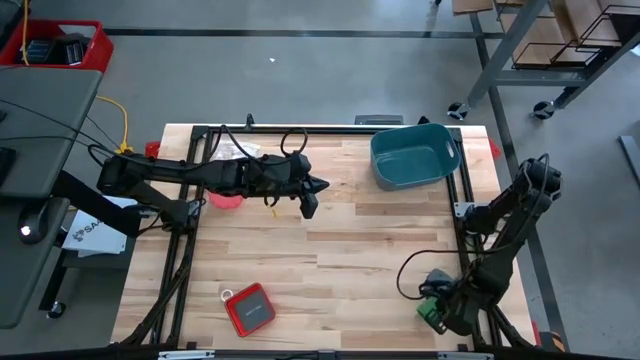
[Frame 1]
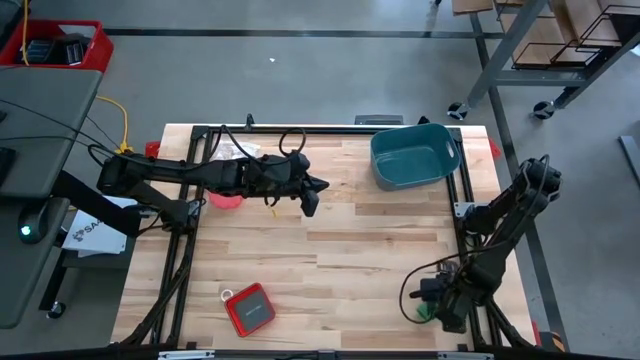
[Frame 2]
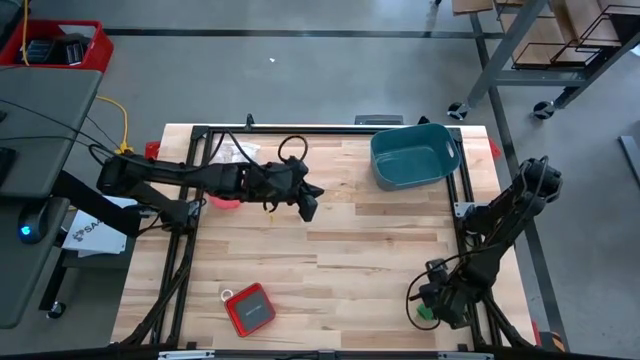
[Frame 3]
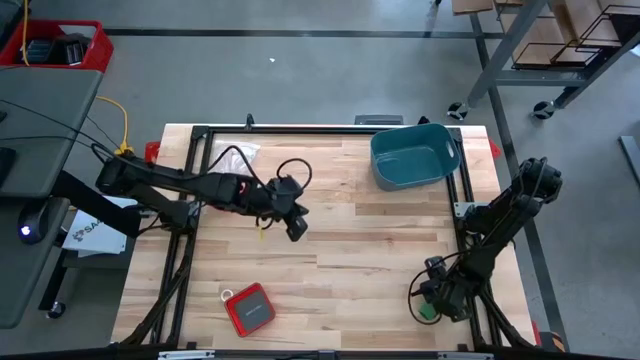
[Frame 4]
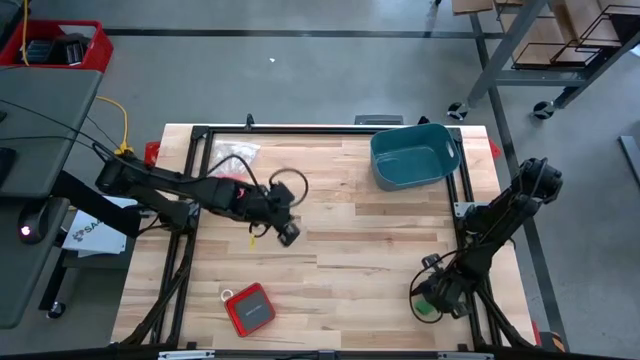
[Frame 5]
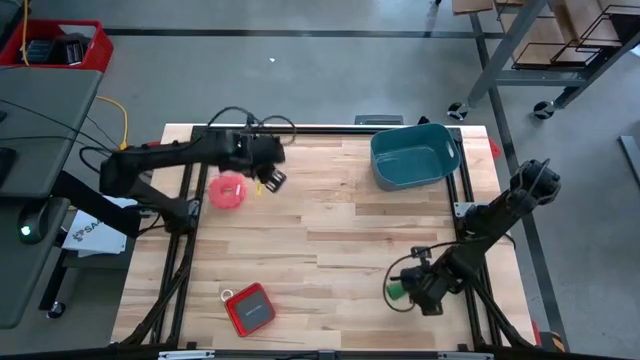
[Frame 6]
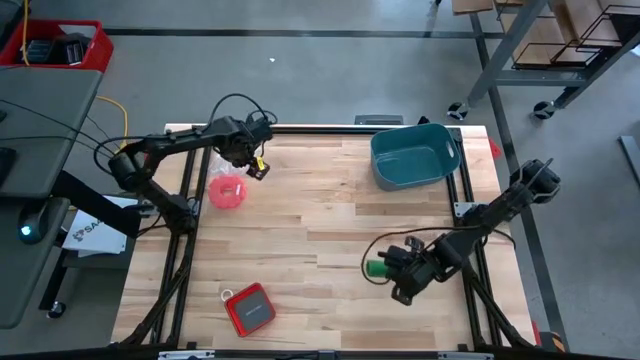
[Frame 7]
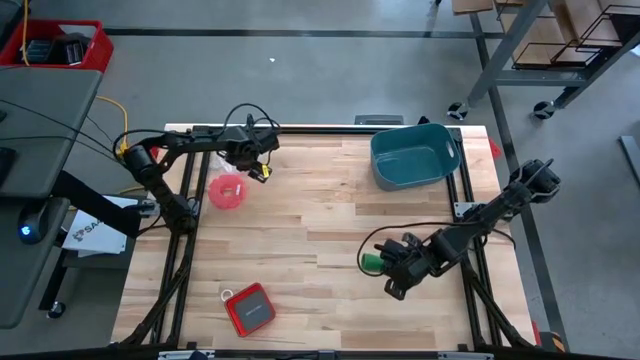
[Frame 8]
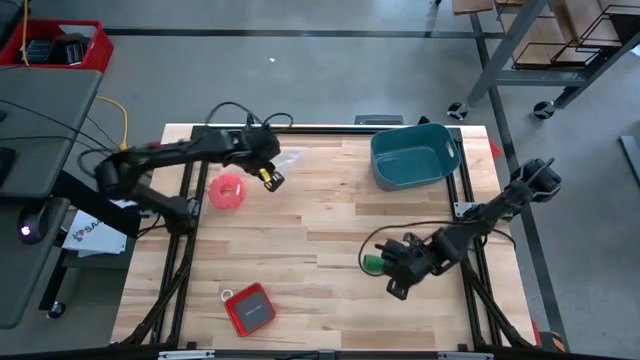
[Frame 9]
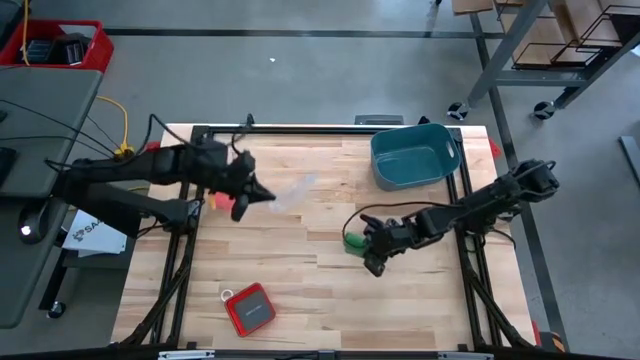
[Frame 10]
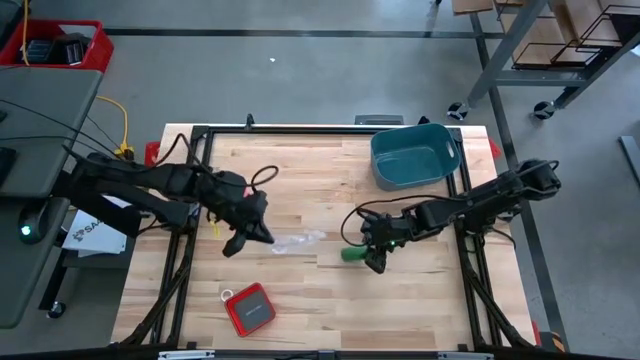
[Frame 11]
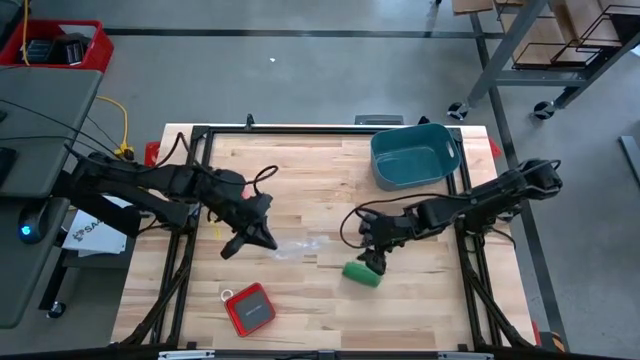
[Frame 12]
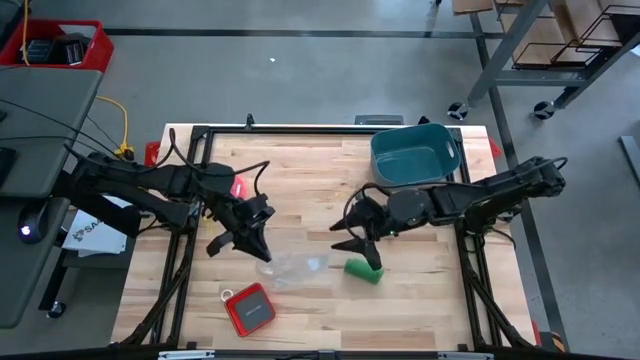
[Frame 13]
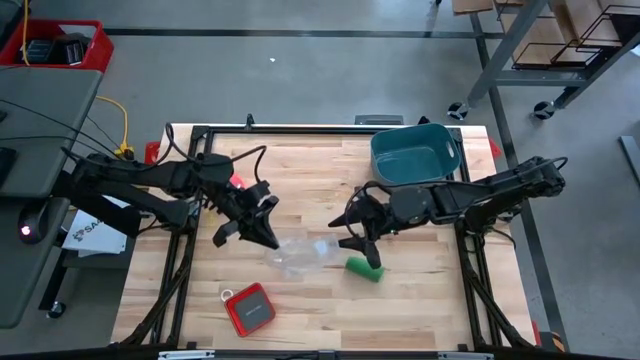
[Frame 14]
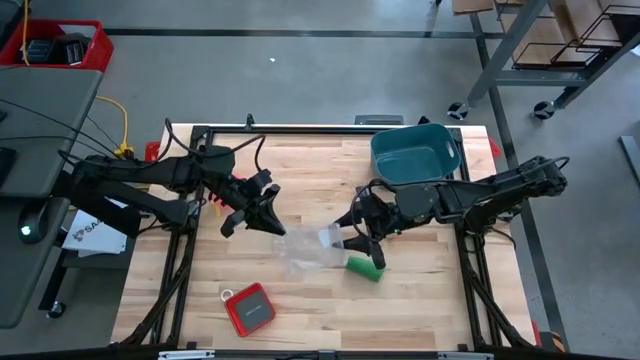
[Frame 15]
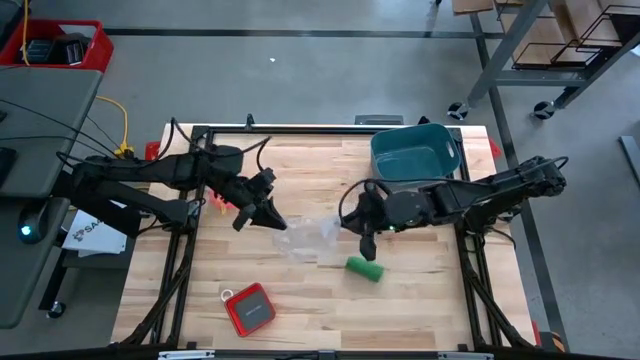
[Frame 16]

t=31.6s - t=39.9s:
Task: Roll bandage
Put the rolled green bandage into the transparent zip bag

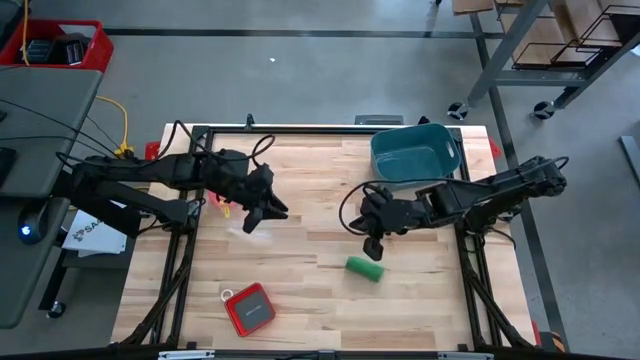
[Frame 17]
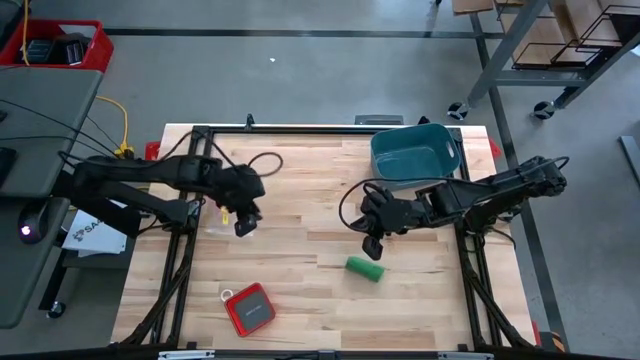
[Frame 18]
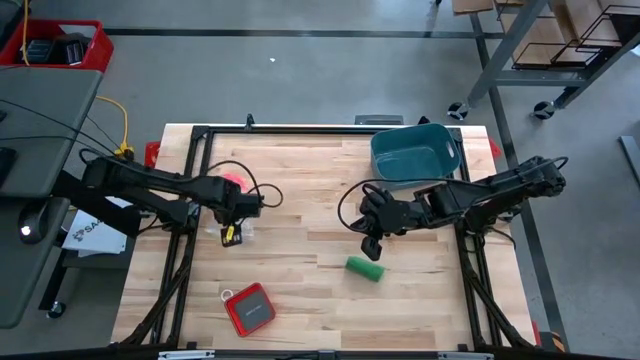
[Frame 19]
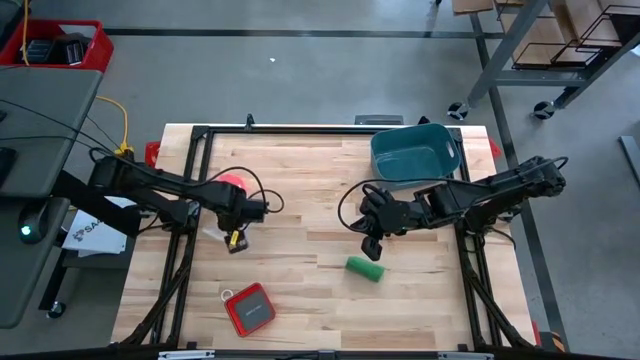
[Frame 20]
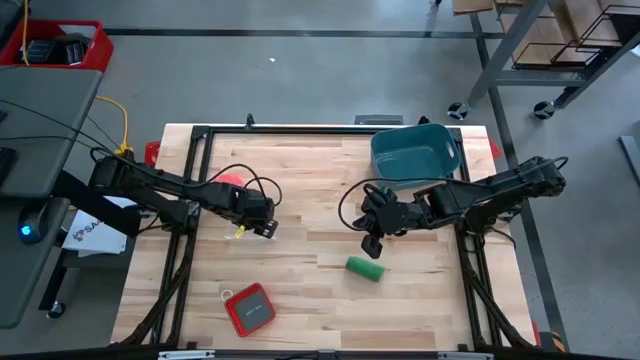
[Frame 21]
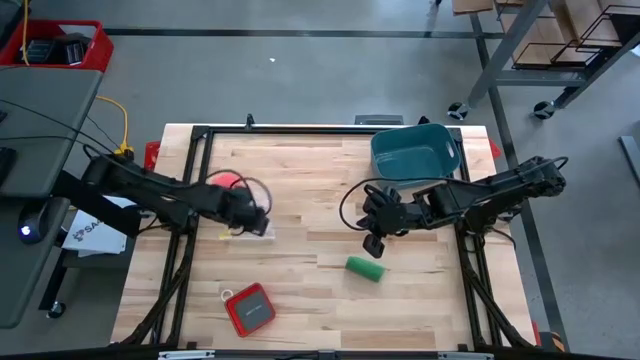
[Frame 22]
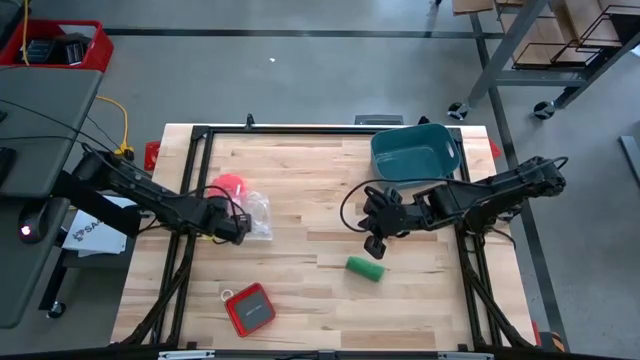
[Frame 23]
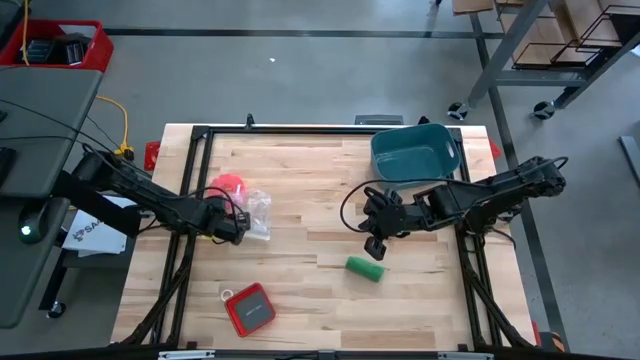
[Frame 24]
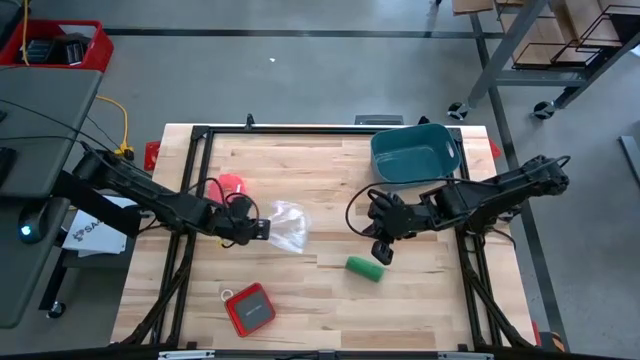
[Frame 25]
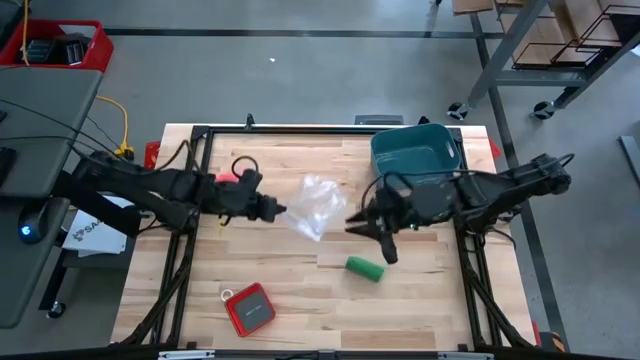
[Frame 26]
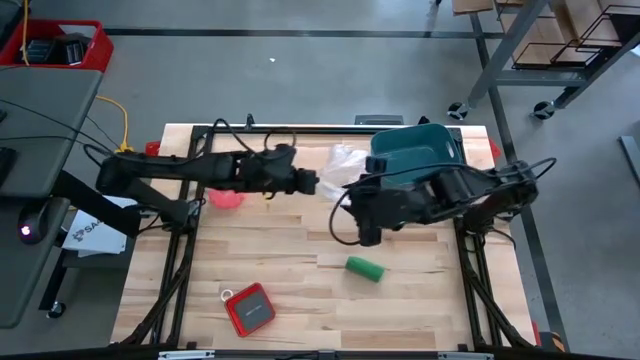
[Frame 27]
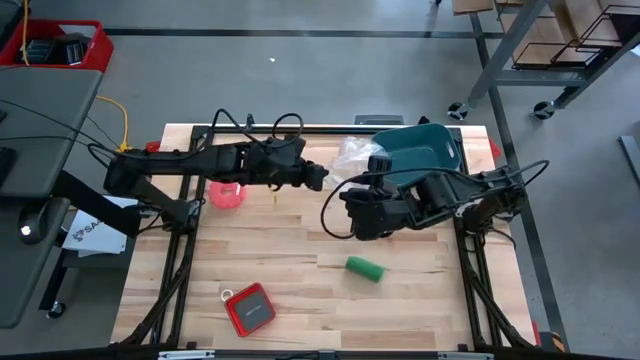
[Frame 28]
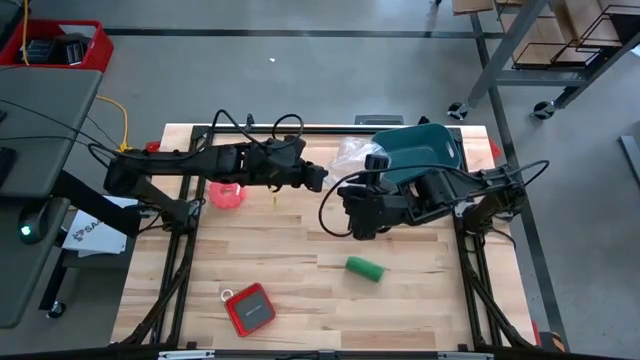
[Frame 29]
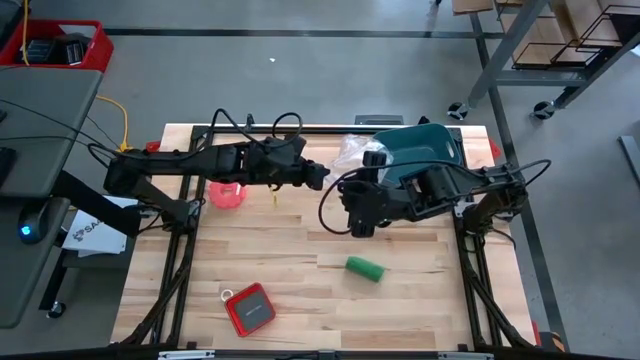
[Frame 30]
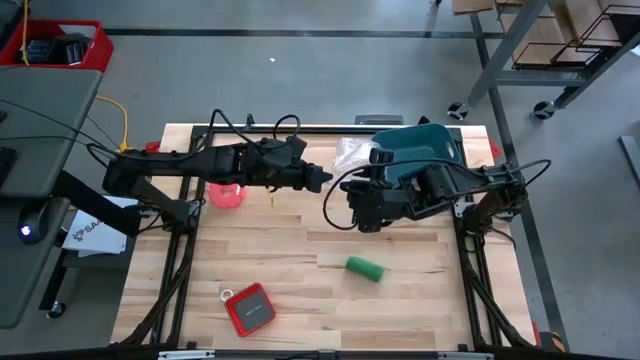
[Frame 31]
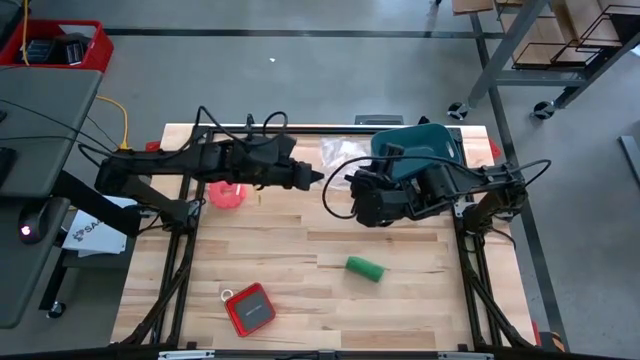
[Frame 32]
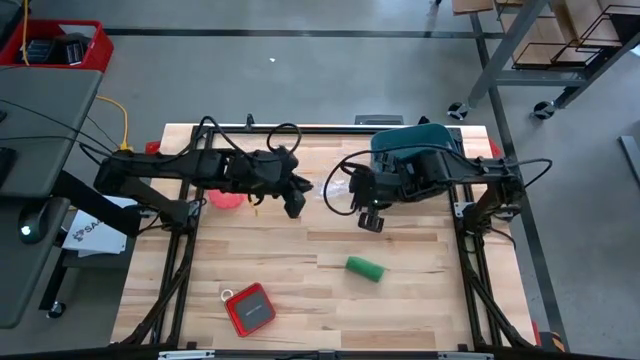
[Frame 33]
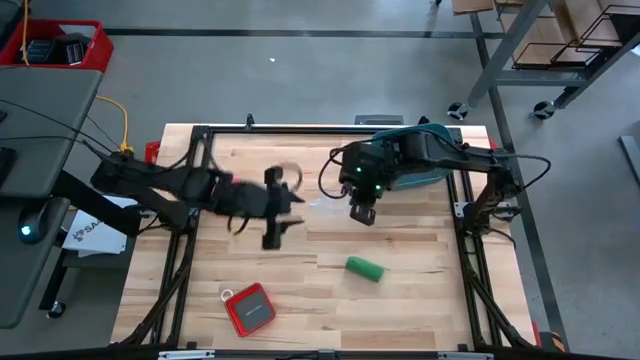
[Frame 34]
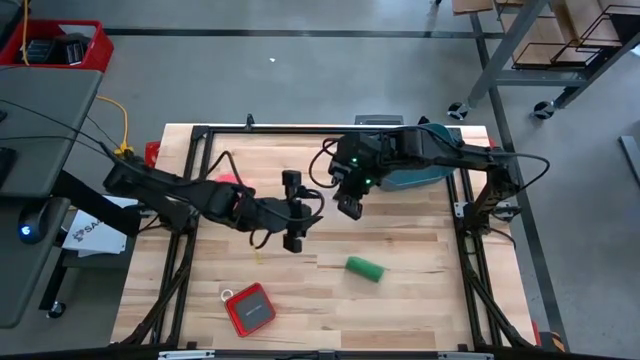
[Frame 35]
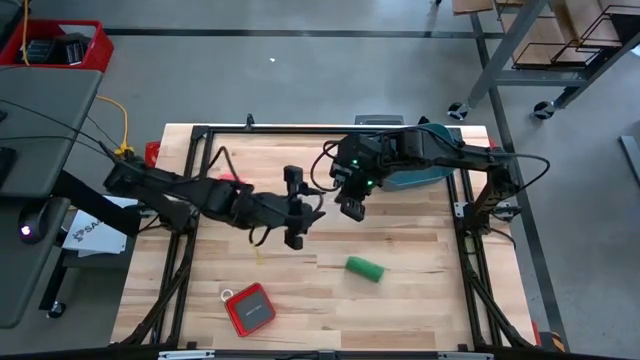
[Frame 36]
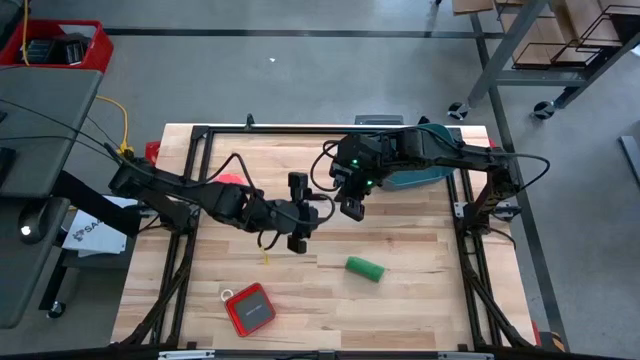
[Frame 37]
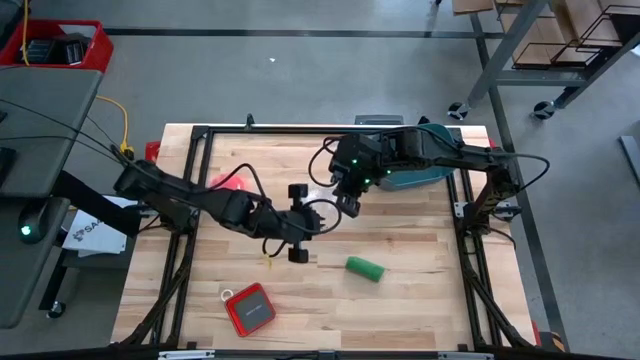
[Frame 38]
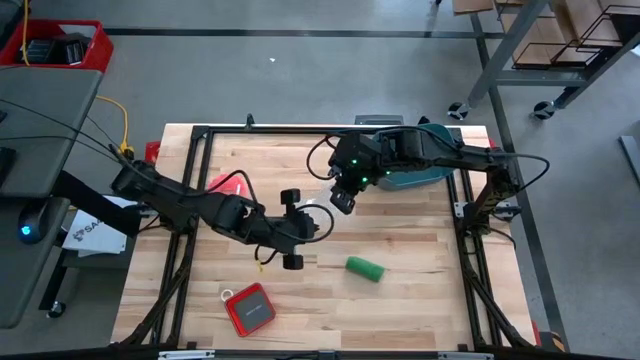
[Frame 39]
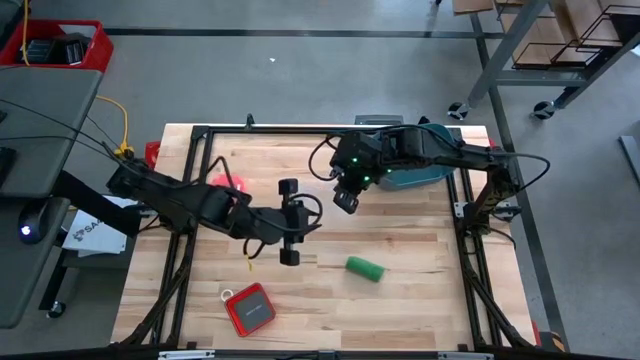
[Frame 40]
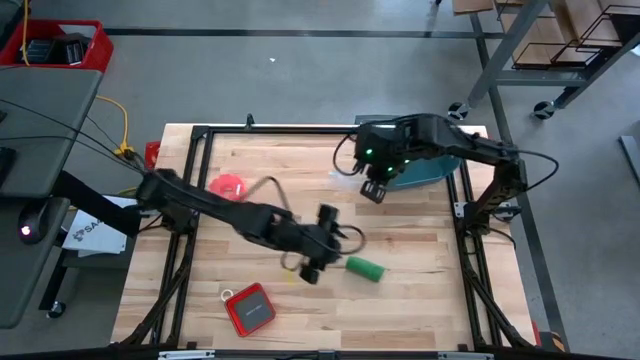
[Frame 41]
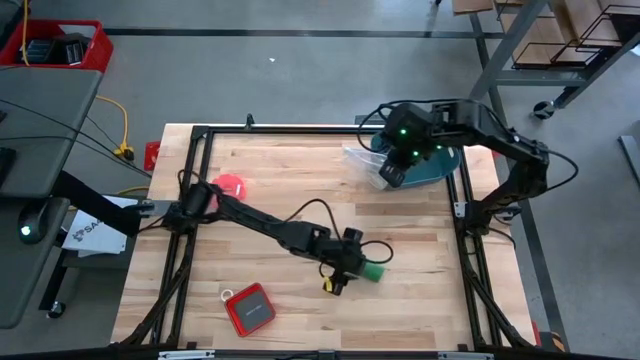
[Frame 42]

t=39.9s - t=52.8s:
Put the rolled green bandage into the transparent zip bag

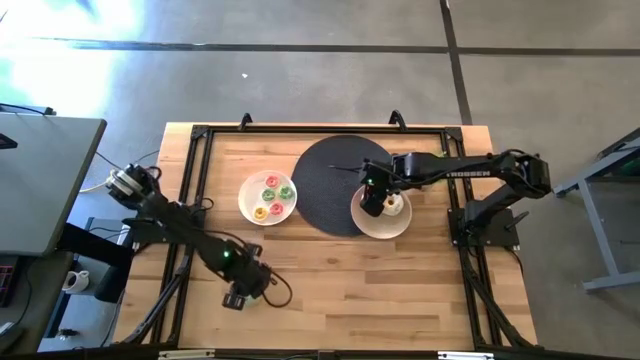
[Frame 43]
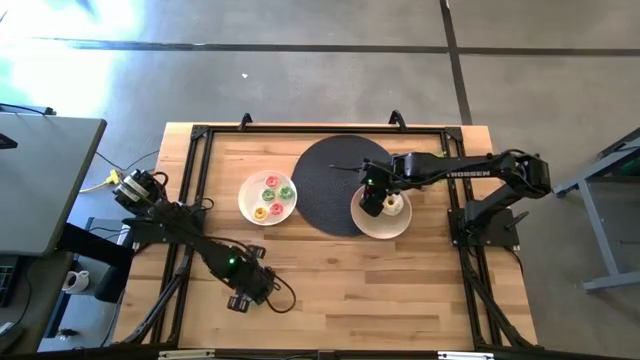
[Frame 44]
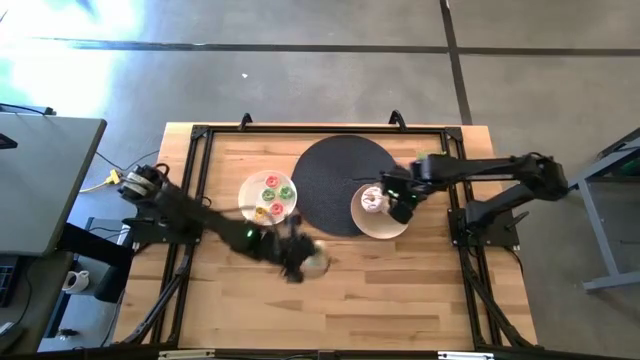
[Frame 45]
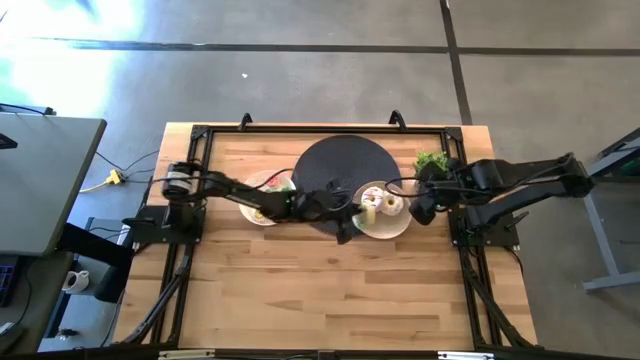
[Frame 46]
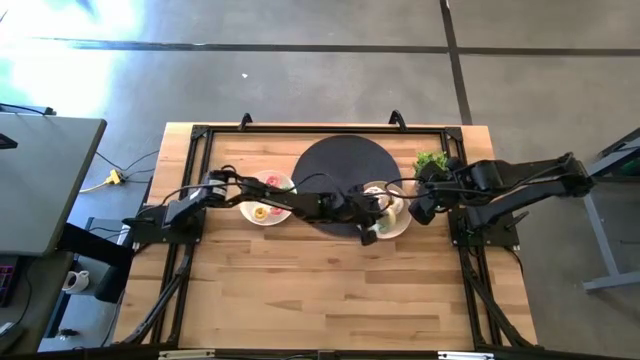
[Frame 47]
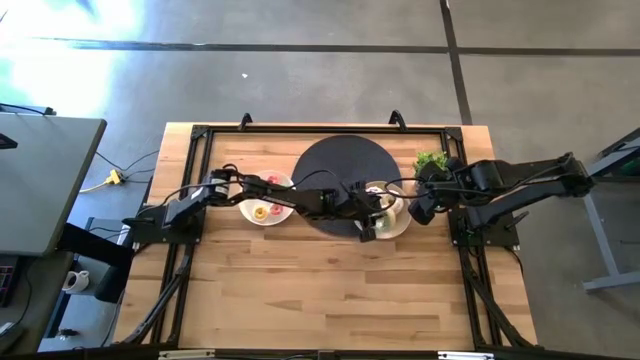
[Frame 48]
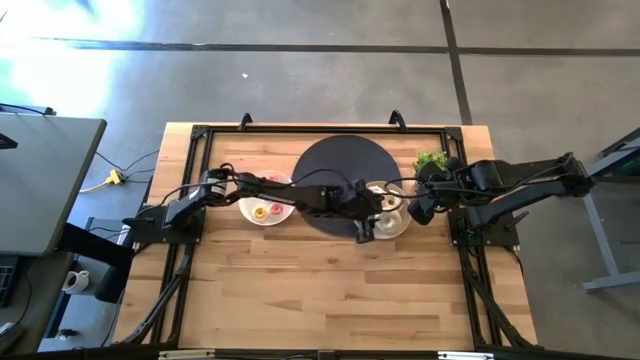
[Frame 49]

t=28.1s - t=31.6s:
Task: Pick & Place donuts
Put the large green donut on the brown plate
